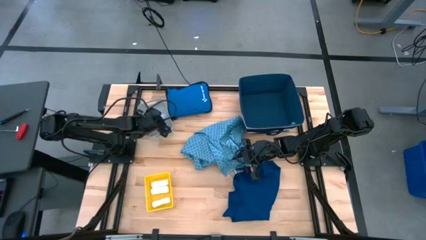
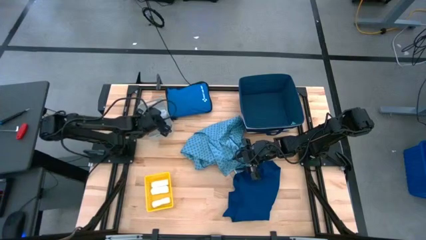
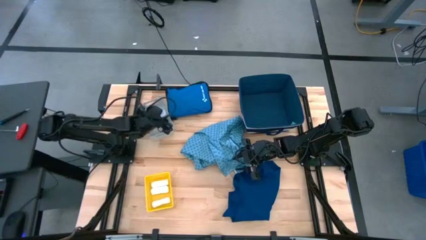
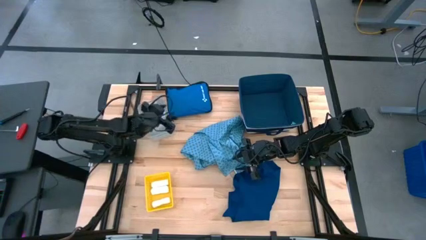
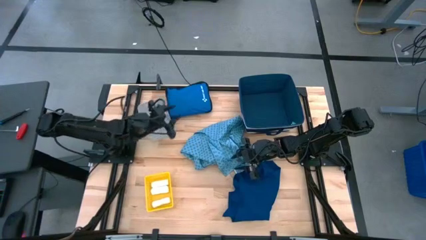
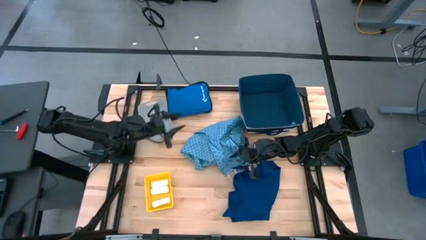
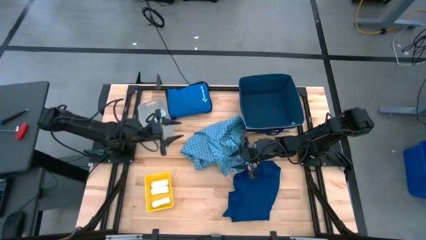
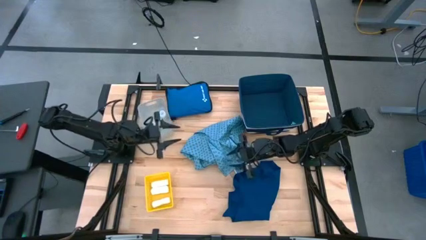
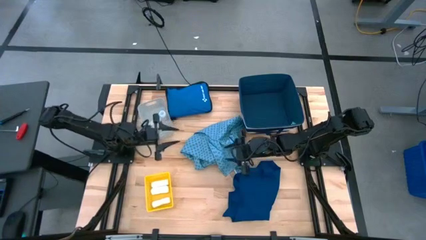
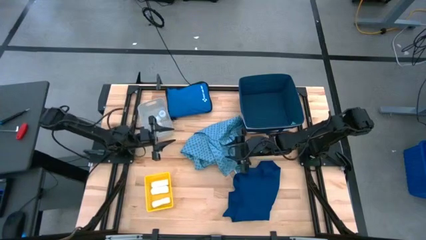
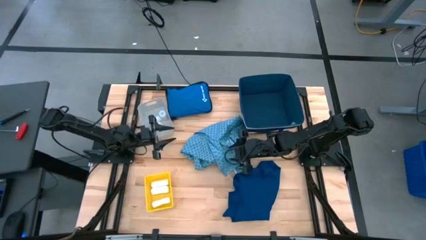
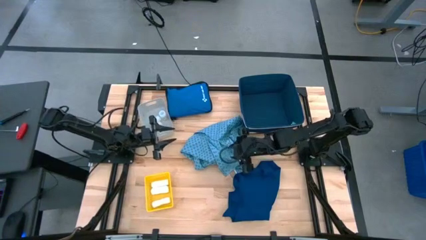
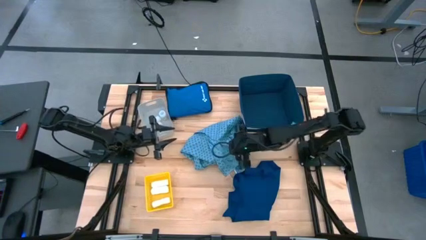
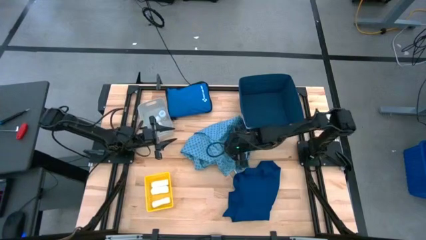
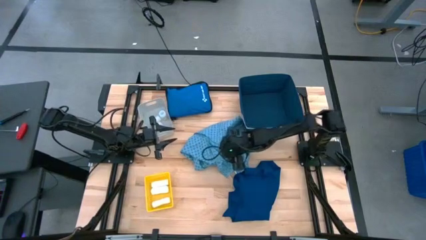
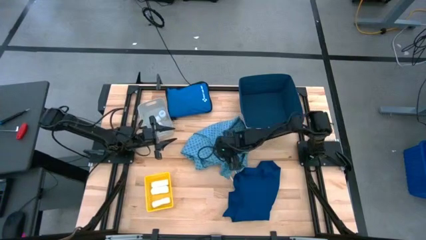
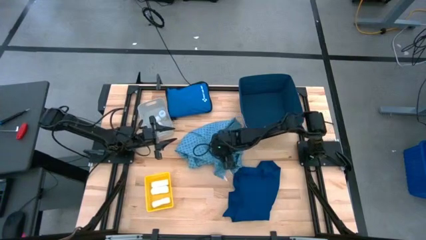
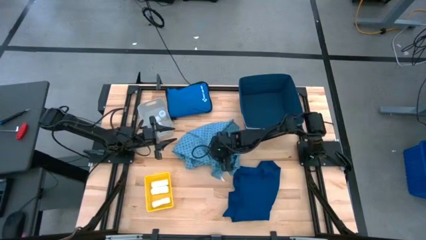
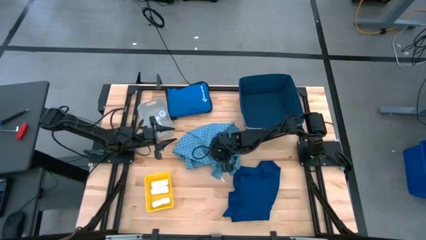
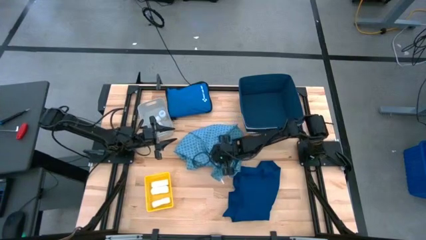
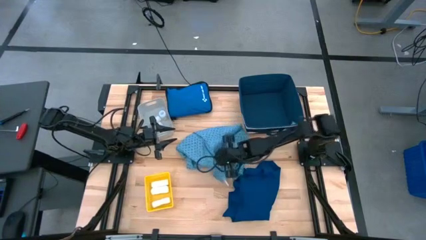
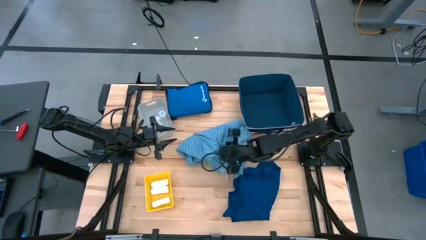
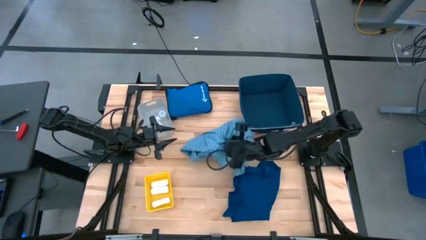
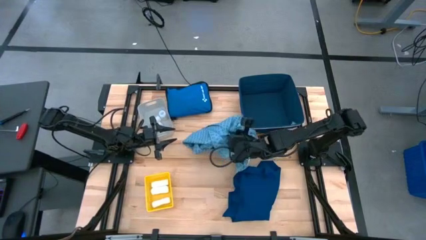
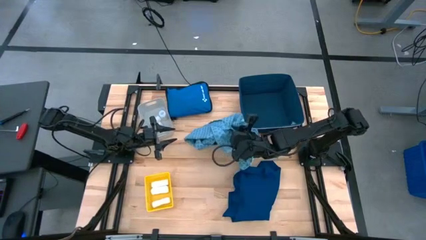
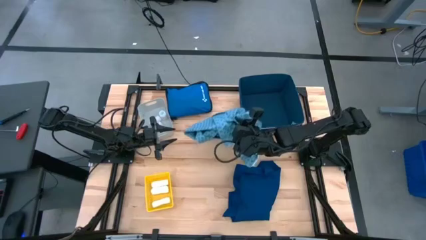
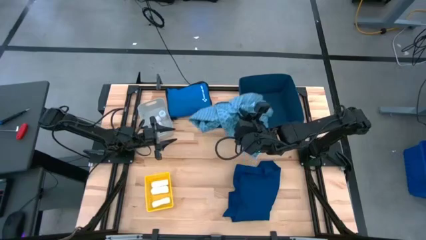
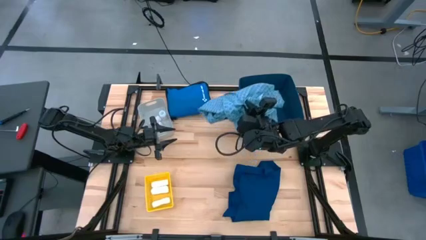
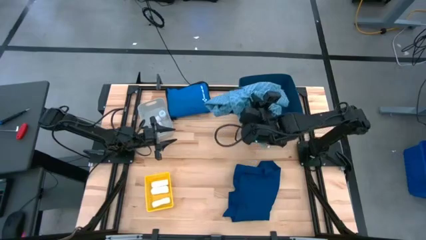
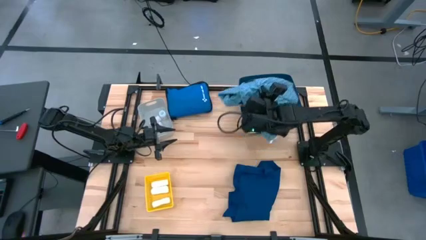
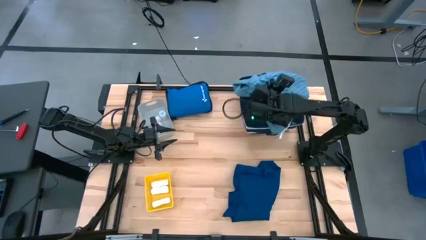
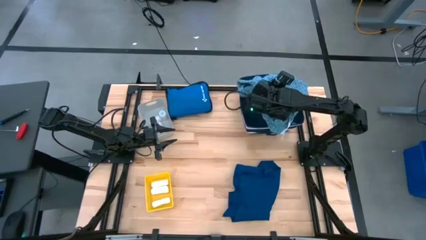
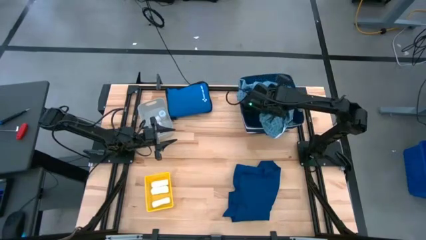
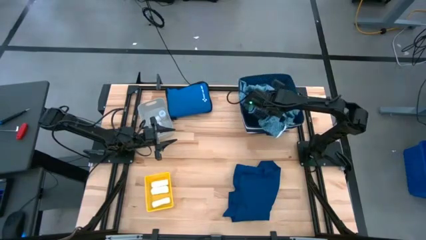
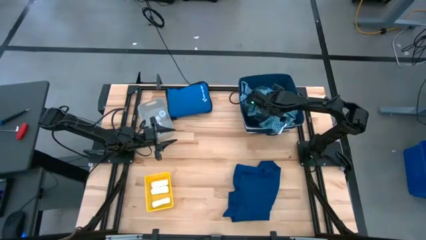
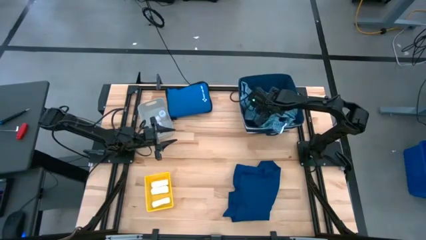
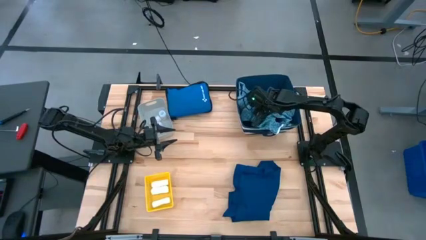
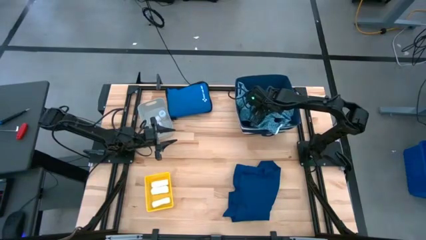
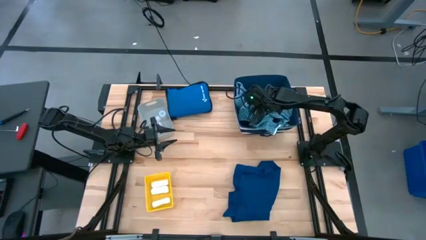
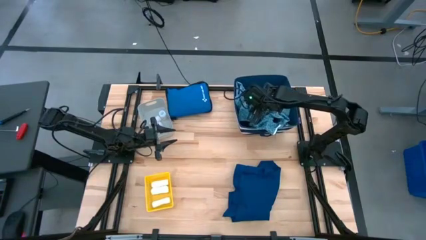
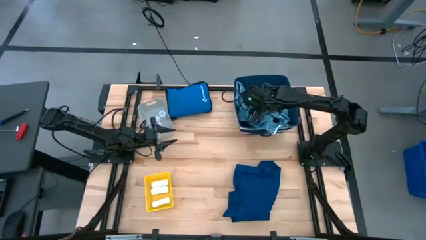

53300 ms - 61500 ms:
Task: Pick & place medical supplies in basket/bin
Put the blue patterned gown into the blue laundry organizer

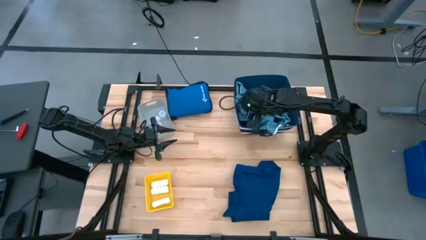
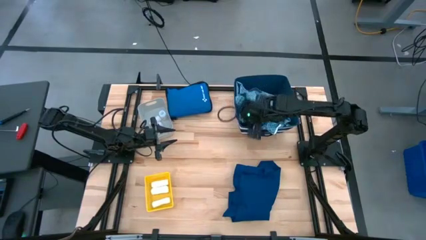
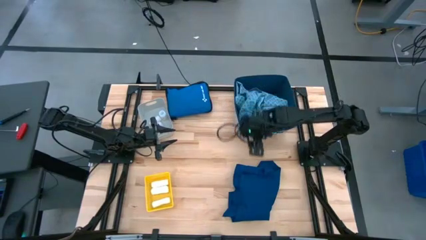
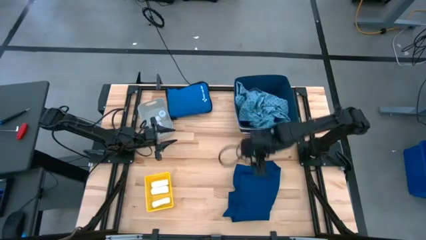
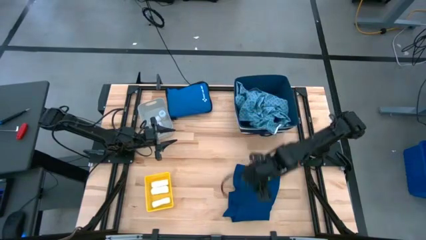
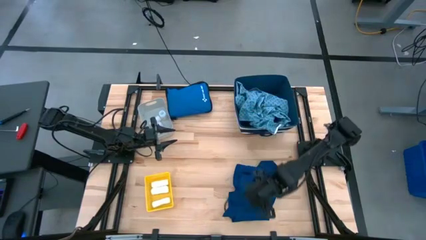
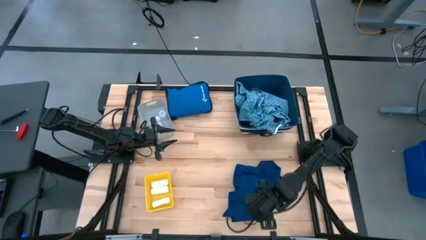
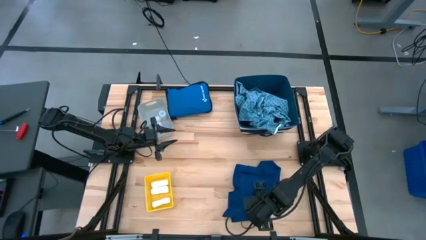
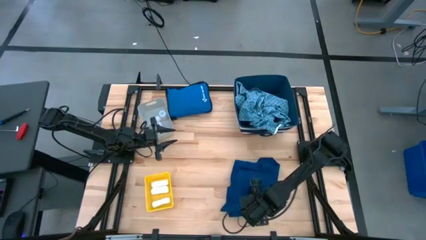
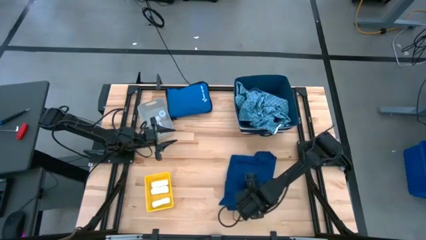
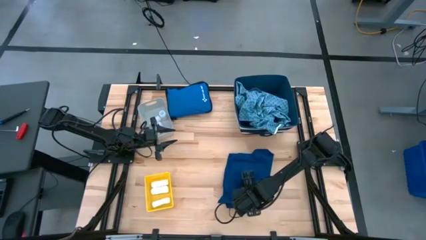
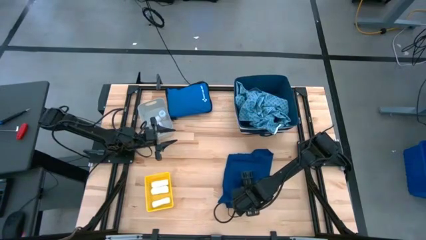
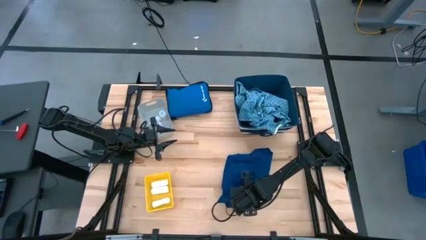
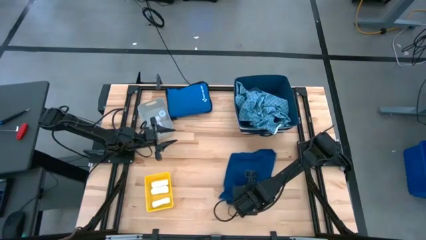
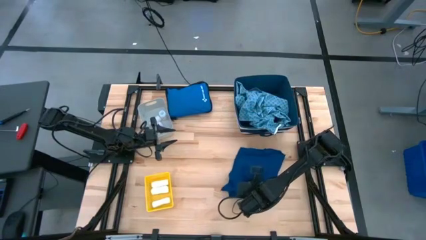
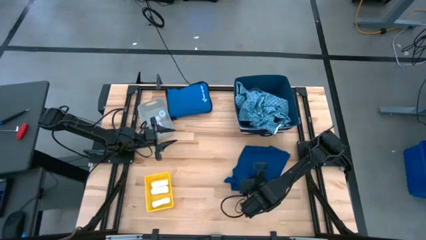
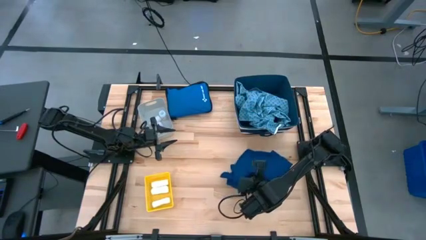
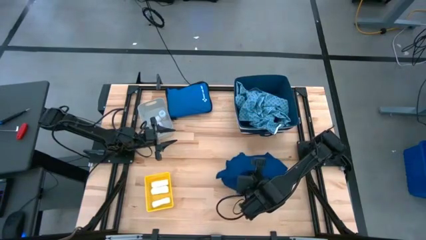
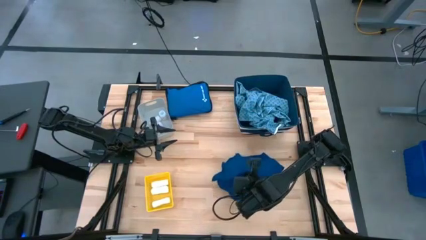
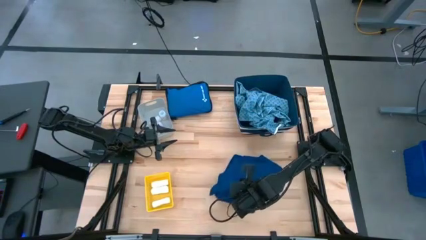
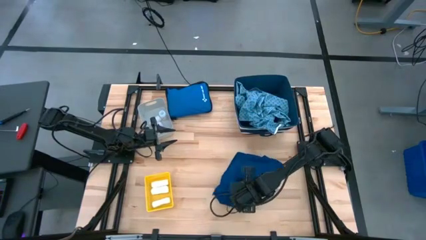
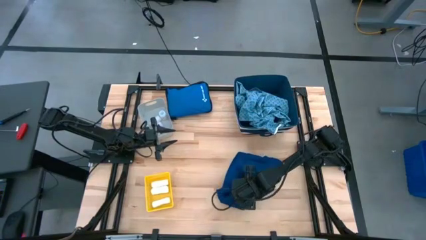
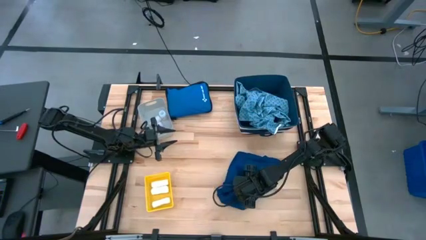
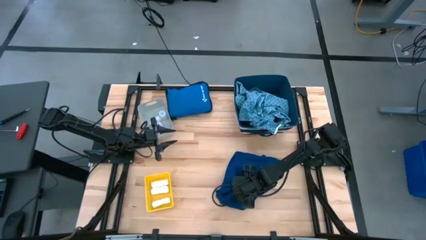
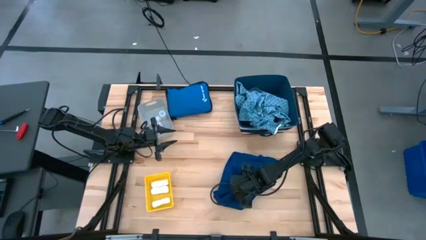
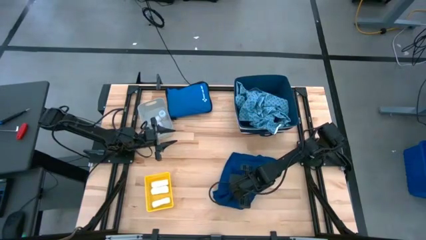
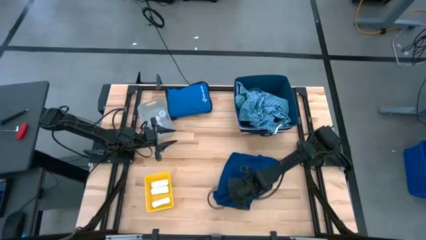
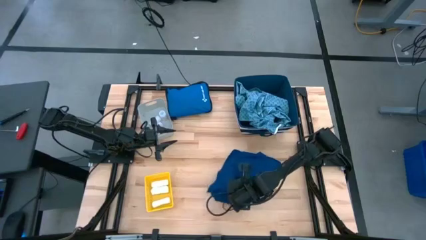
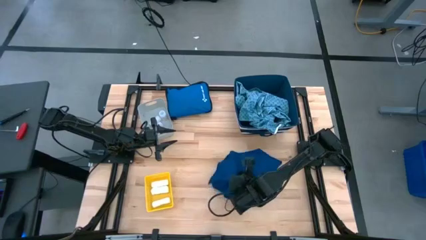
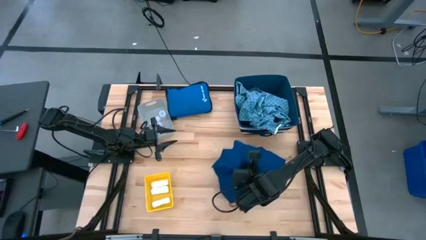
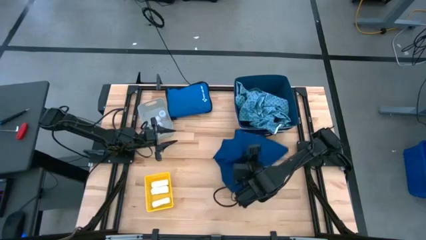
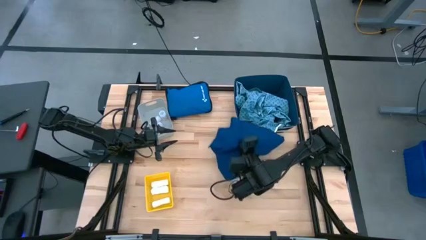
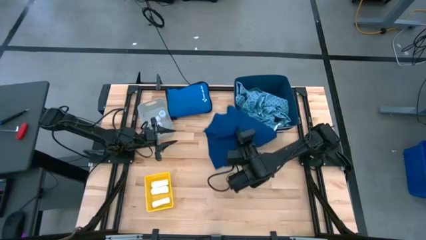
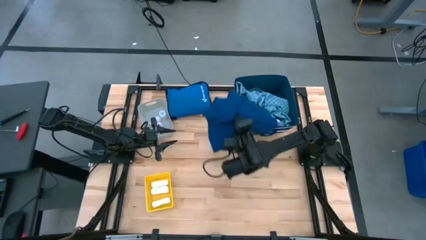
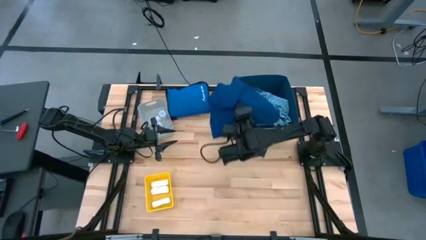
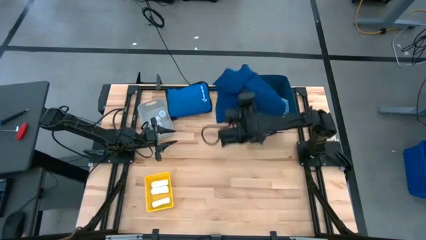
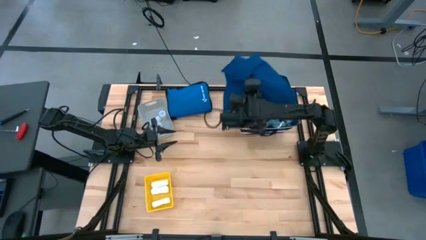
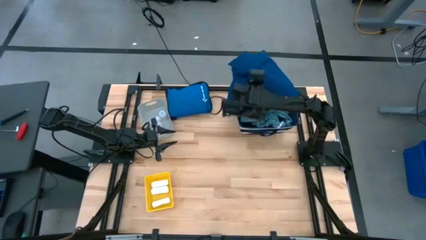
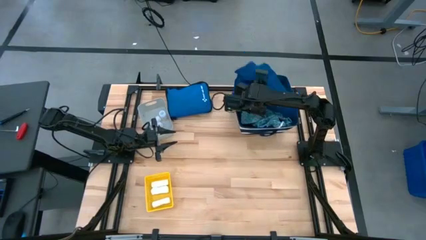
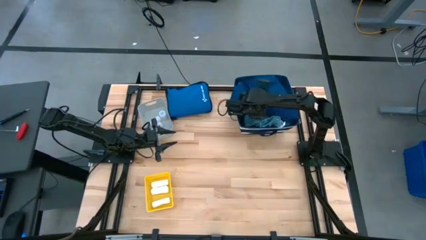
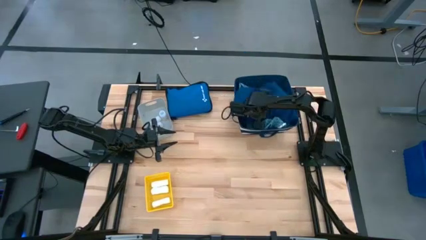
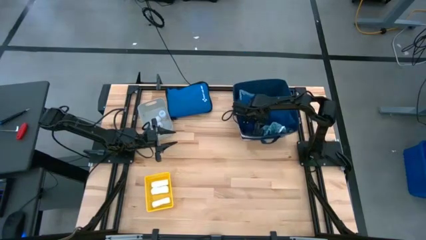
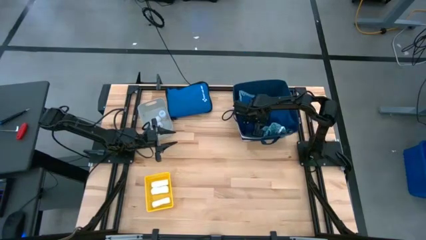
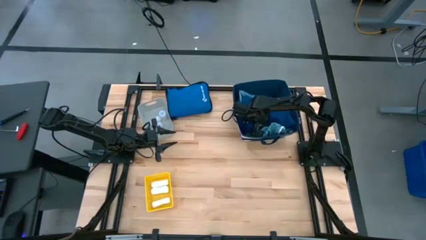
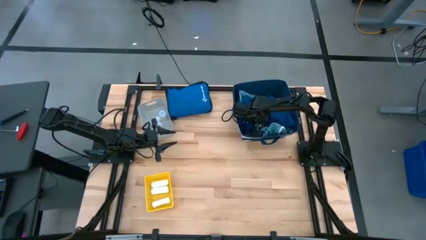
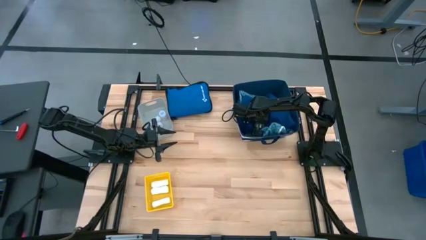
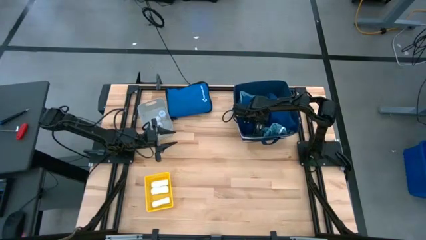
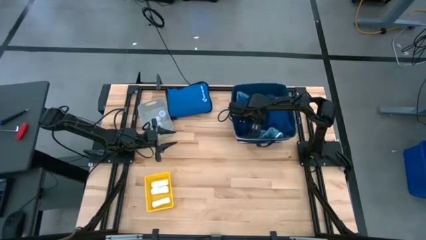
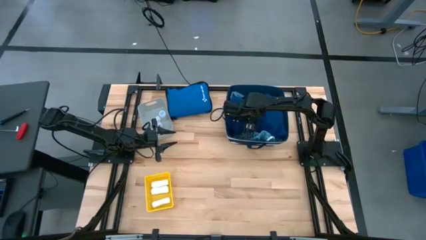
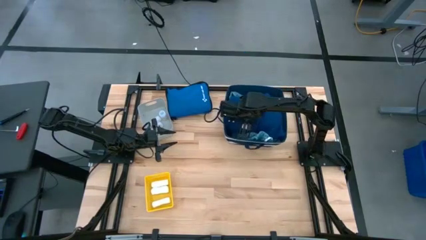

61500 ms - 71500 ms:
Put the blue gown into the blue laundry organizer
